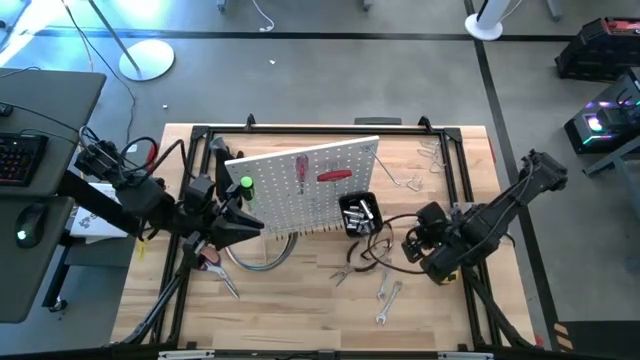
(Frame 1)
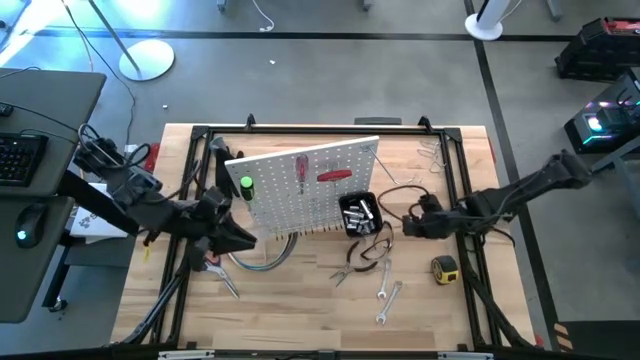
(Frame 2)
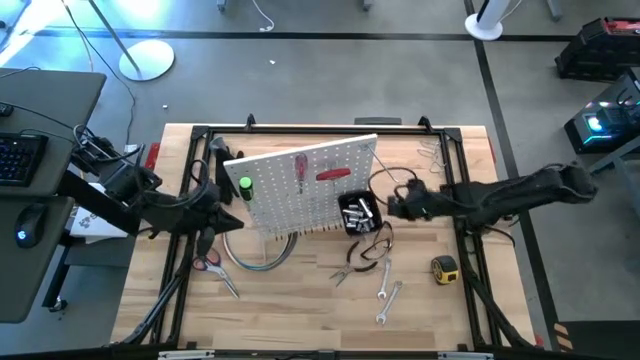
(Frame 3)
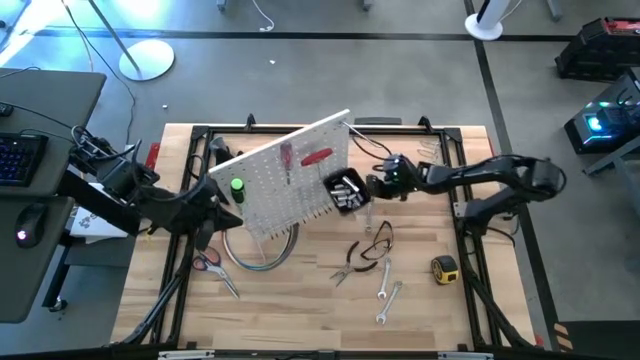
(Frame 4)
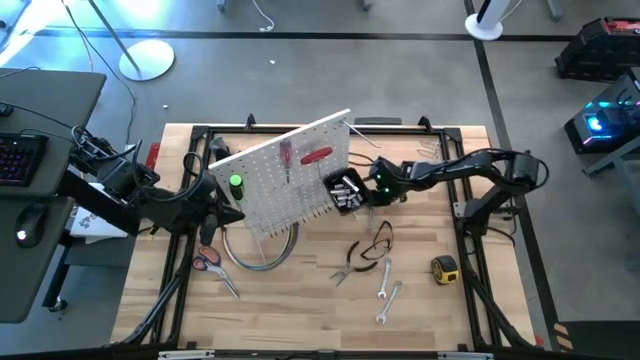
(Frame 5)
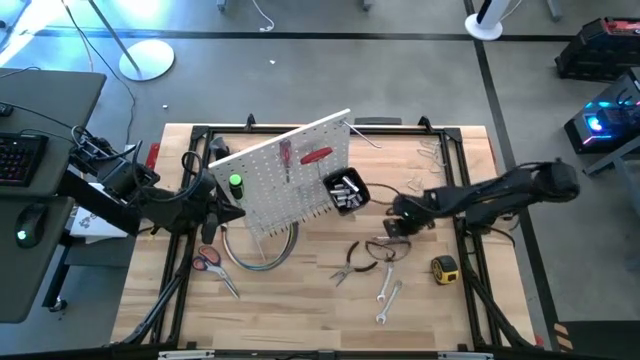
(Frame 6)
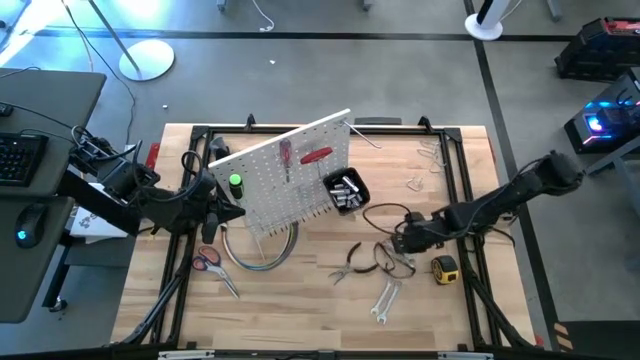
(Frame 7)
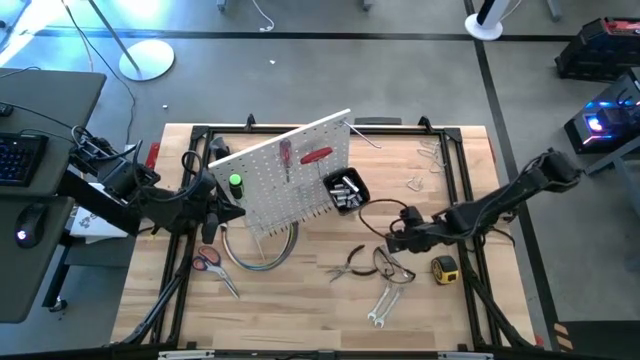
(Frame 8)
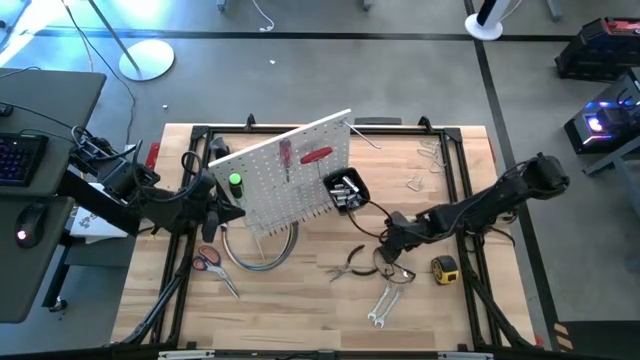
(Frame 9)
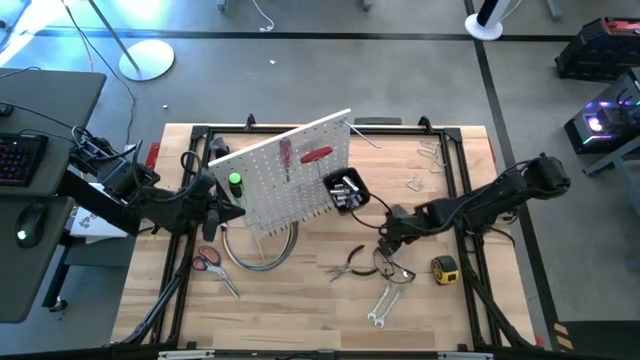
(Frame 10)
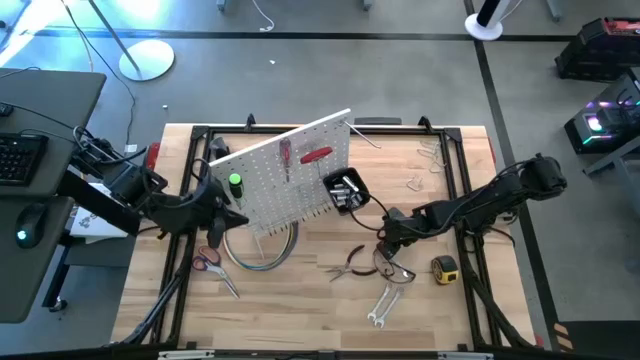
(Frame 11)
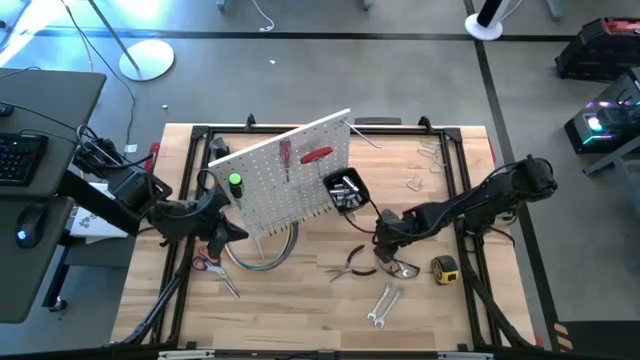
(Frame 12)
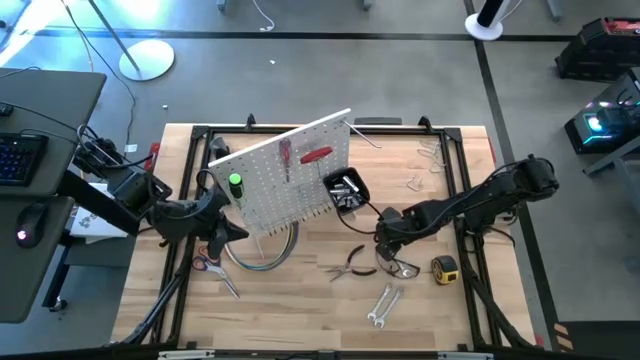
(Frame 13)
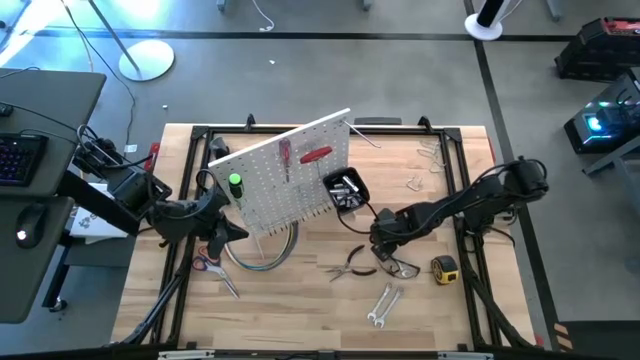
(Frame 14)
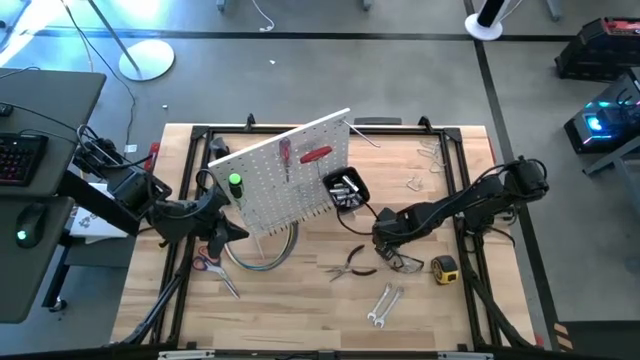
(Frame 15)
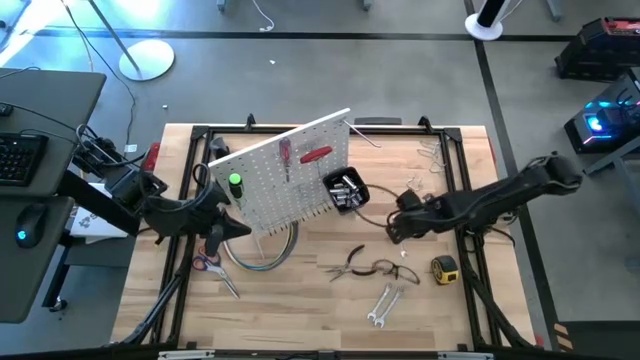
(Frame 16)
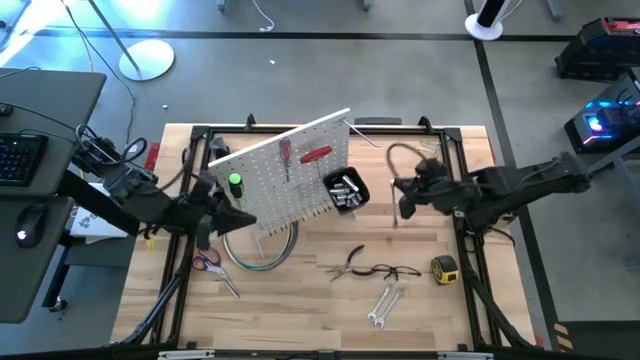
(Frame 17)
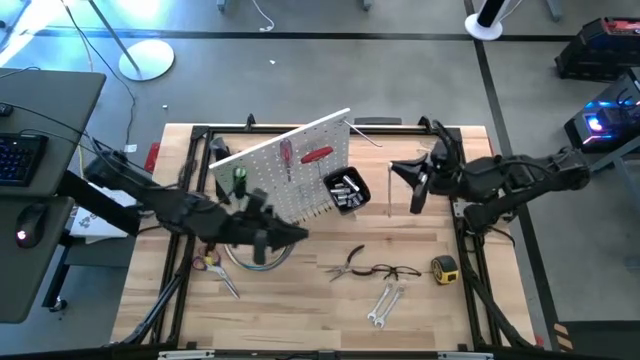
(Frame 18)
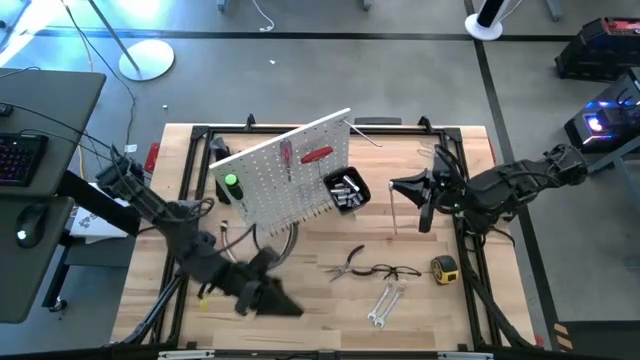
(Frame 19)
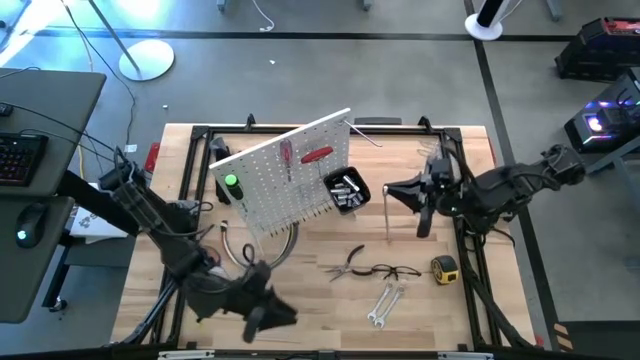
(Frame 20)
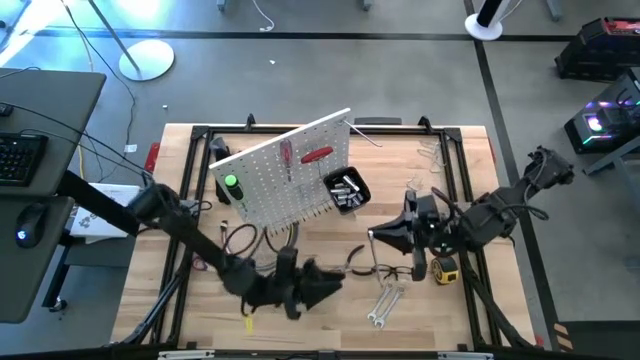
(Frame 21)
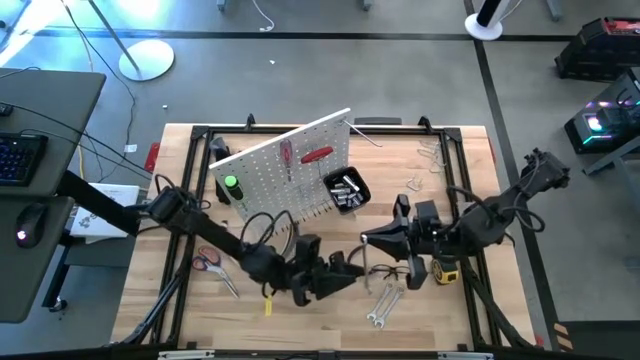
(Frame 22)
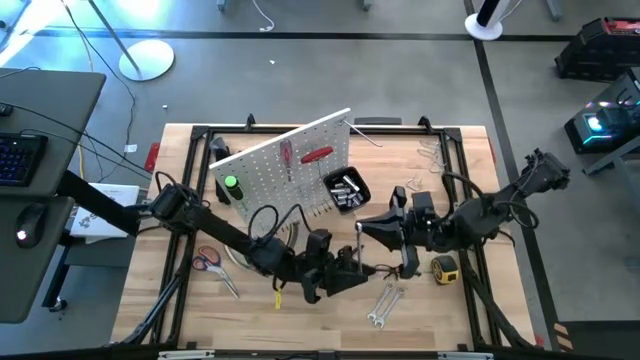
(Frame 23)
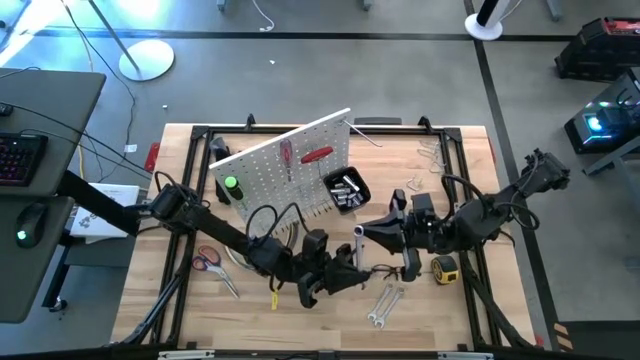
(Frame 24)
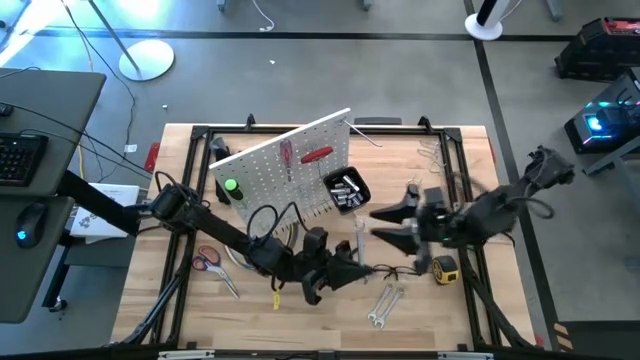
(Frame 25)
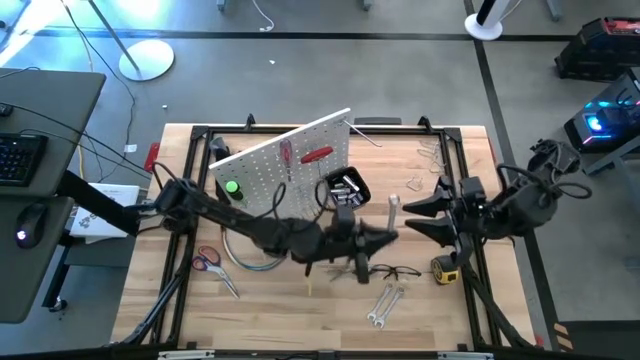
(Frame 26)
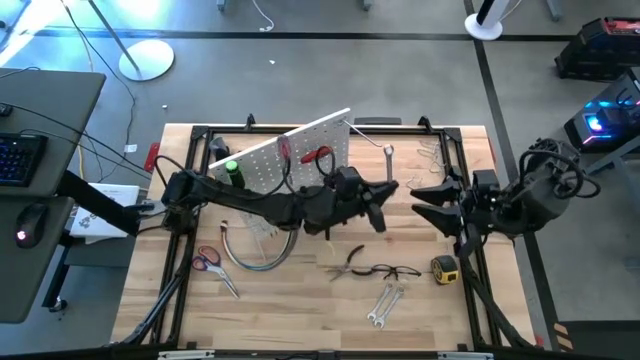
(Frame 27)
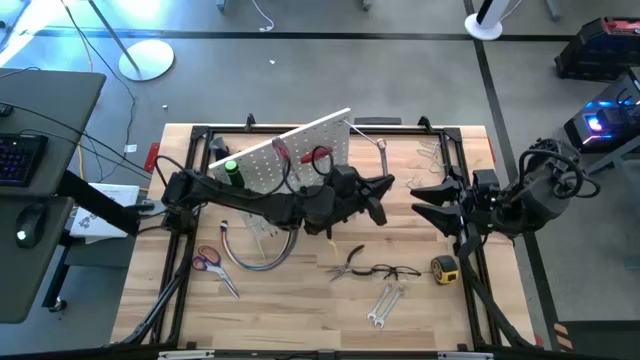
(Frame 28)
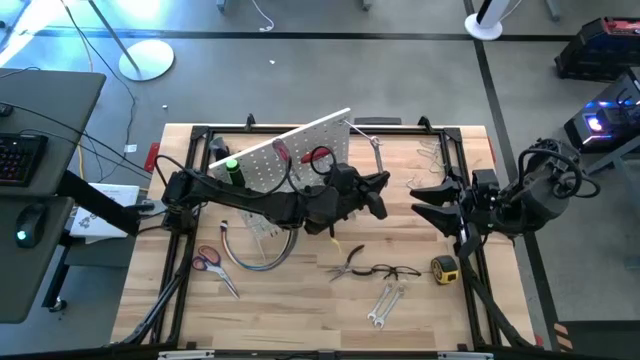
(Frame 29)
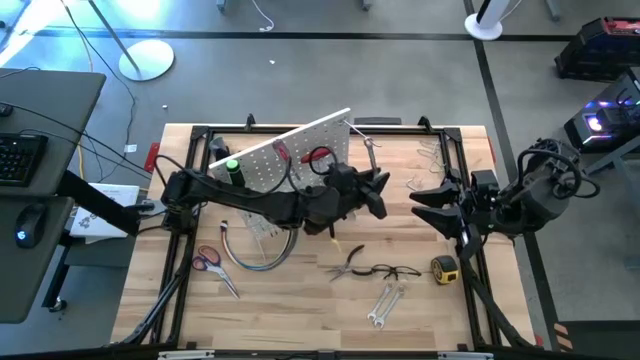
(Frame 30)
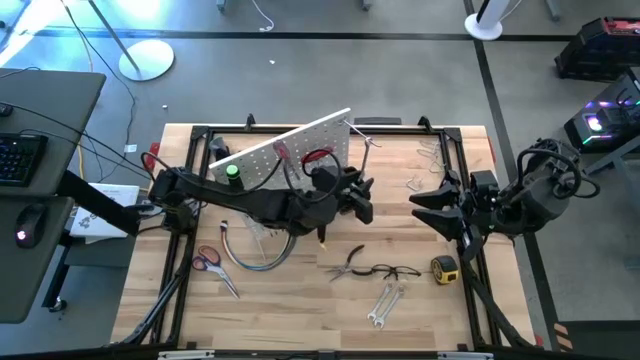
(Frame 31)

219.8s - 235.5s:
Task: Hang tools onto peg board
Hang the wrench on the peg board

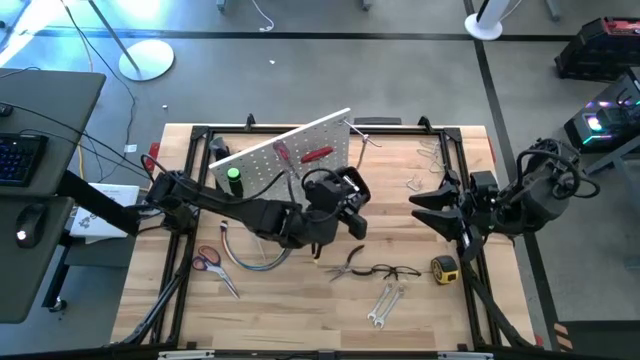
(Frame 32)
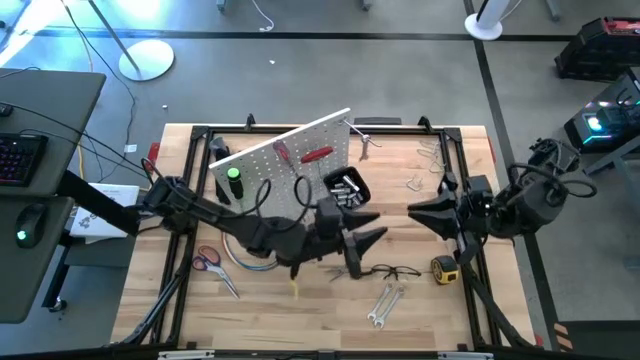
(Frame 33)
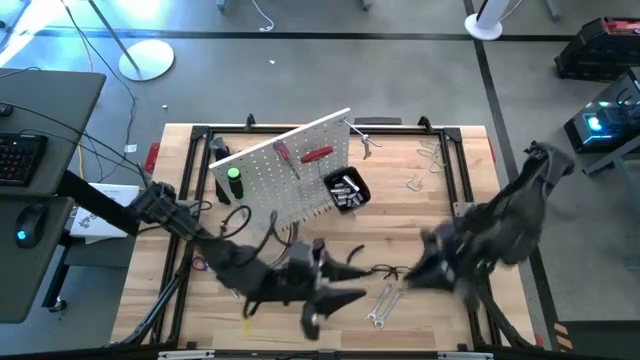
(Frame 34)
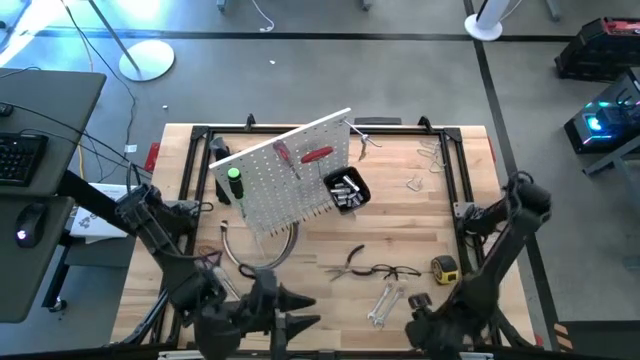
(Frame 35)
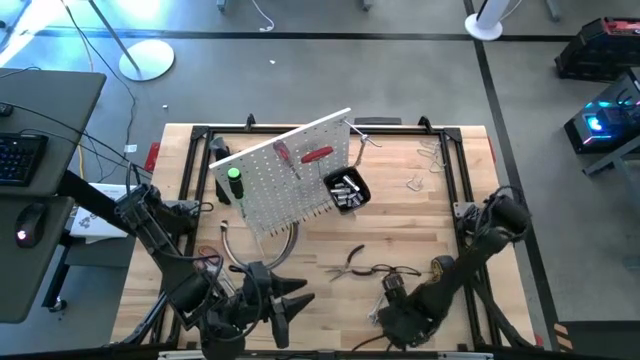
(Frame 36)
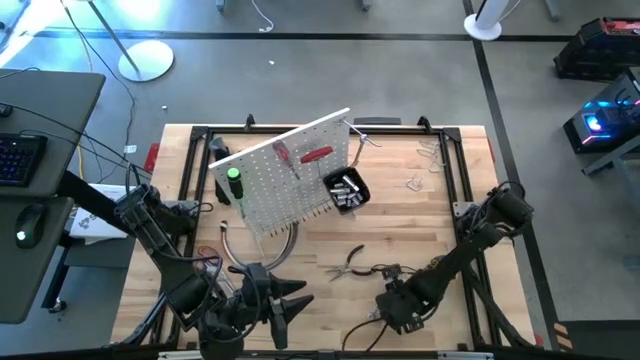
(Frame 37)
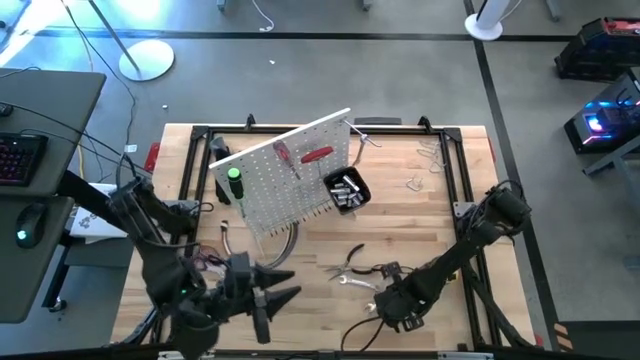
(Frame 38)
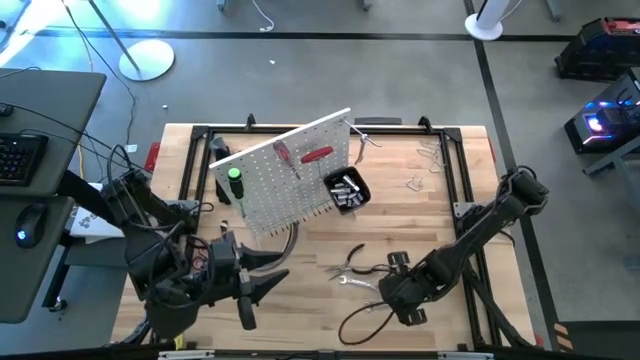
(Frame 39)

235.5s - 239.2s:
Hang the wrench on the peg board

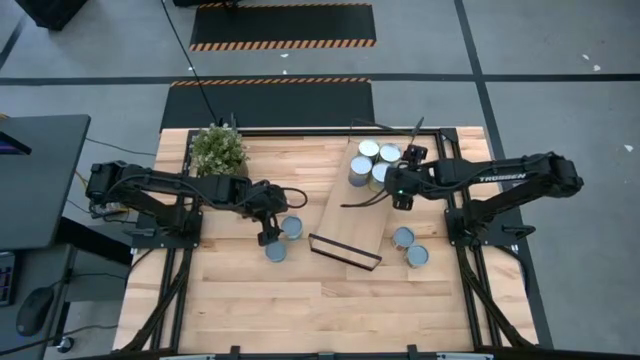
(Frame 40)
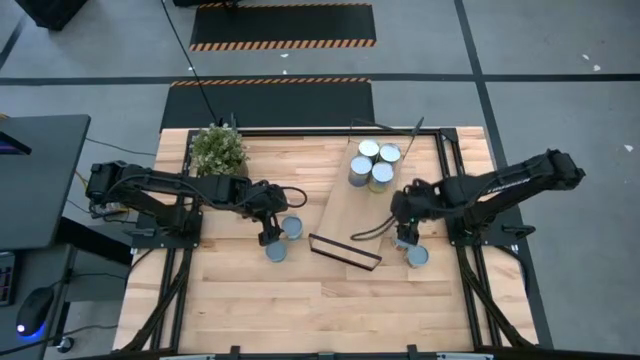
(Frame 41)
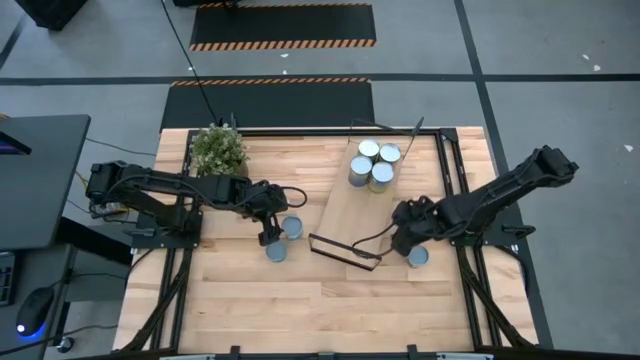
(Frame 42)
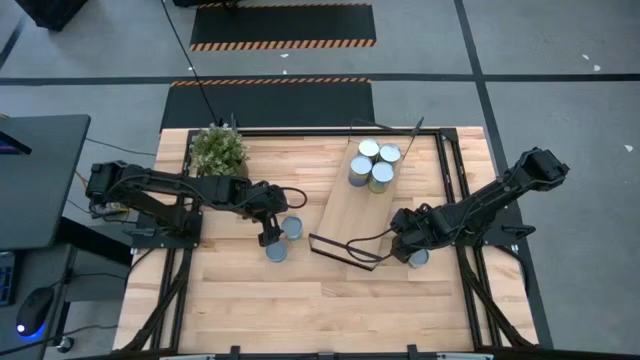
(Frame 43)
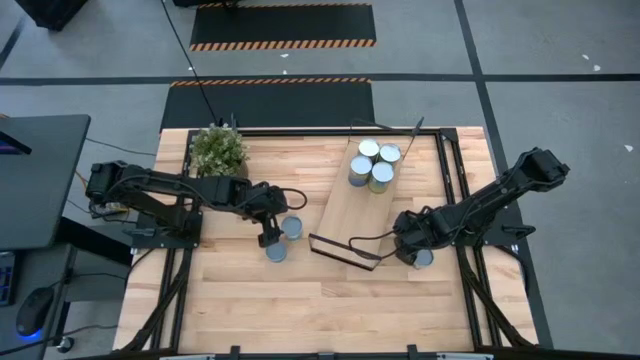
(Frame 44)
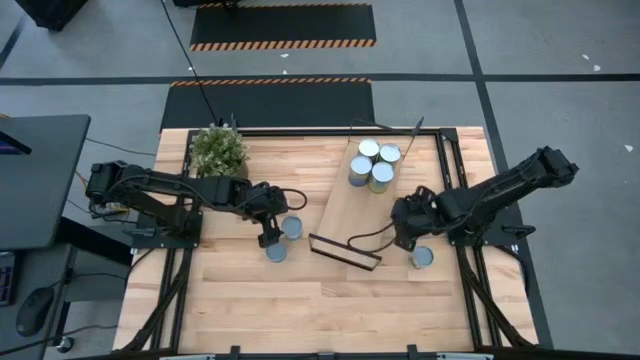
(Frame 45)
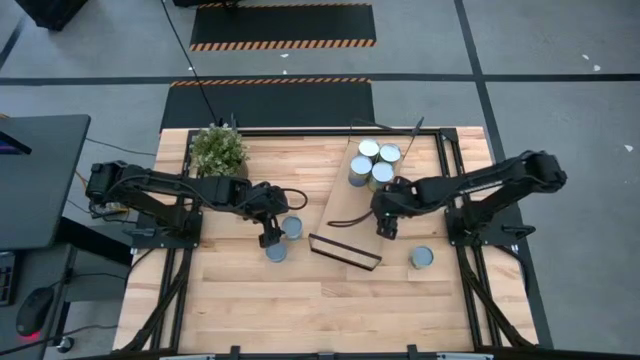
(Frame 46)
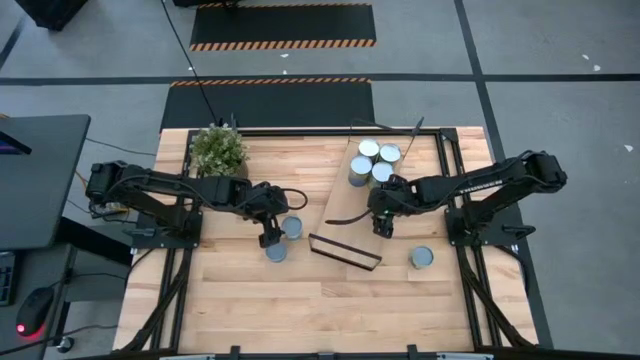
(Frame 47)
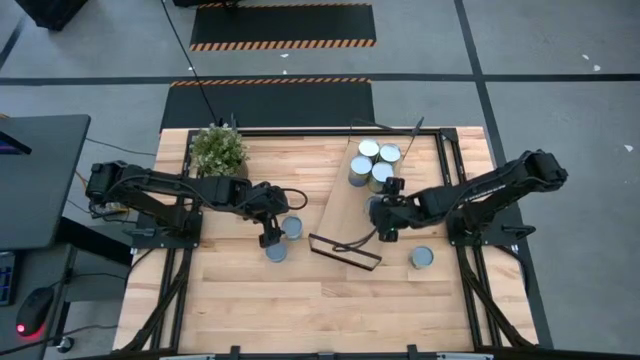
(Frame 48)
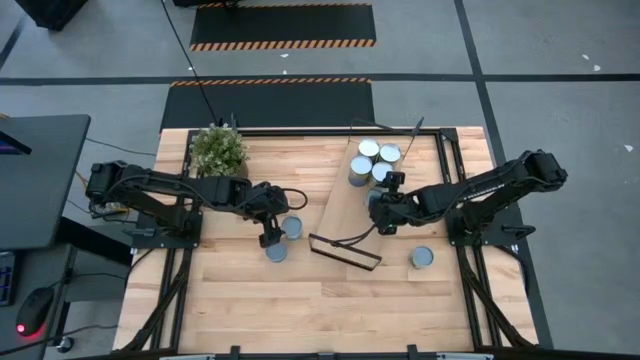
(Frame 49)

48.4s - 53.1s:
Task: Pick and place cans onto a shelf
Put the canned diced tomatoes on the shelf
